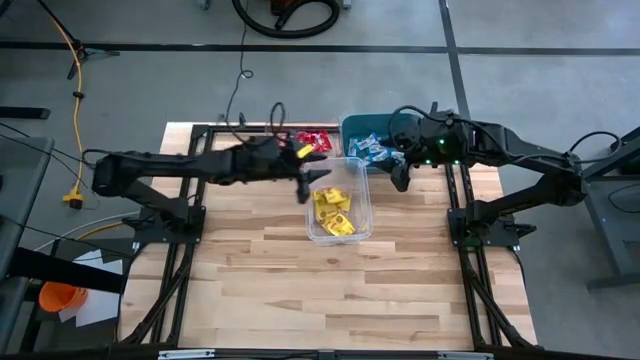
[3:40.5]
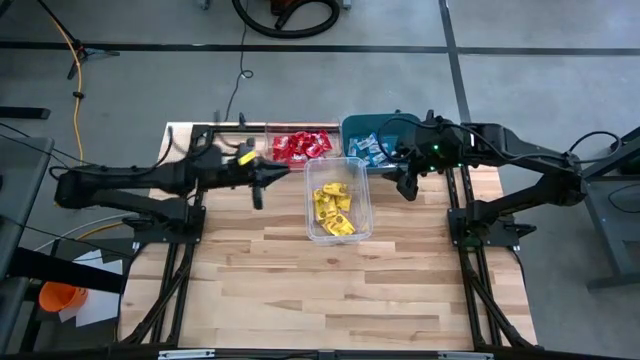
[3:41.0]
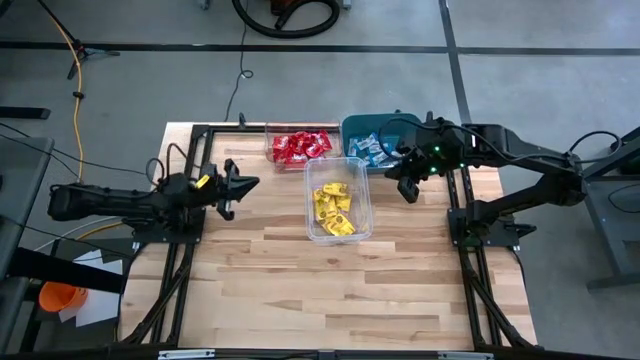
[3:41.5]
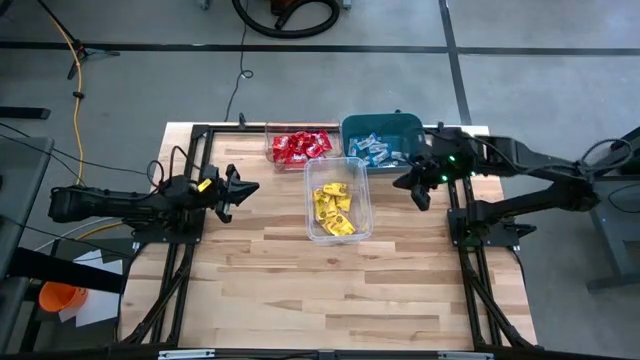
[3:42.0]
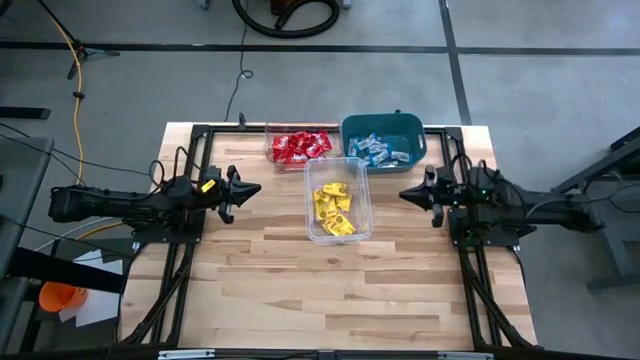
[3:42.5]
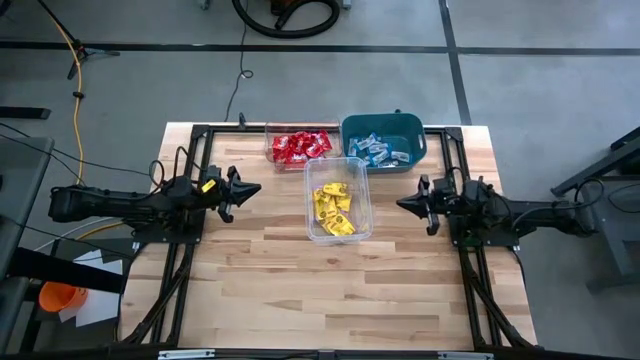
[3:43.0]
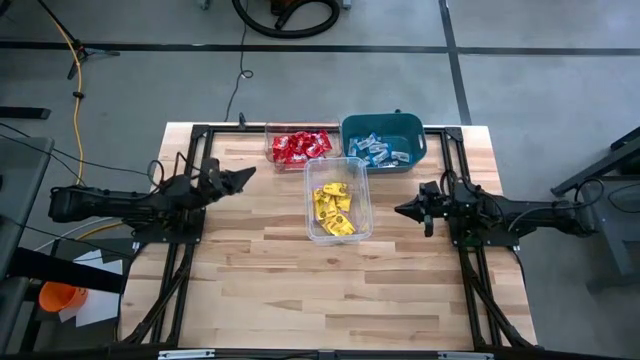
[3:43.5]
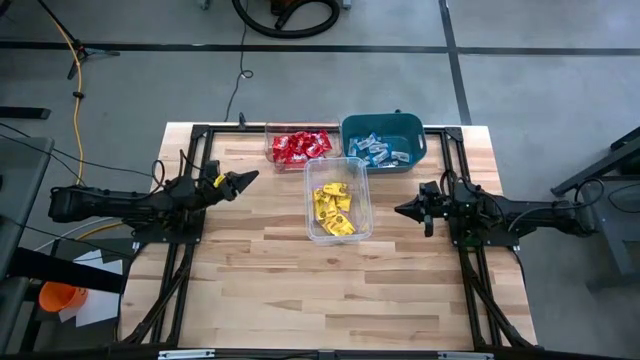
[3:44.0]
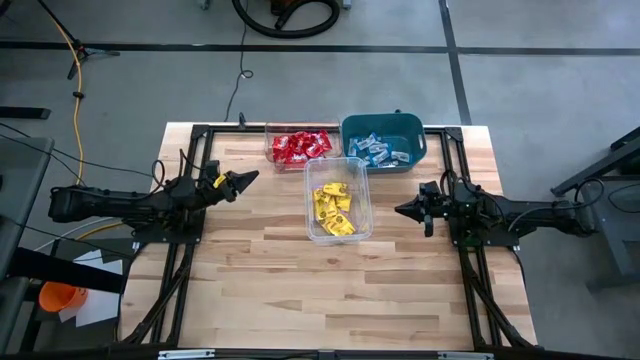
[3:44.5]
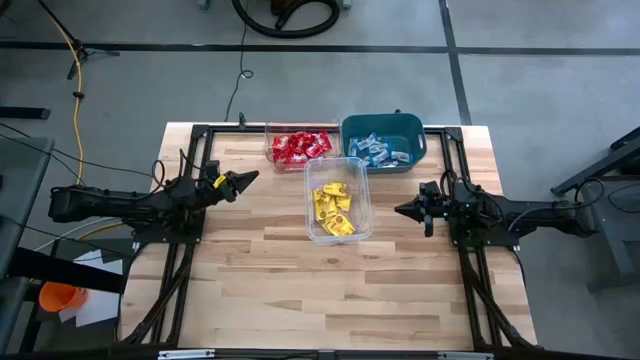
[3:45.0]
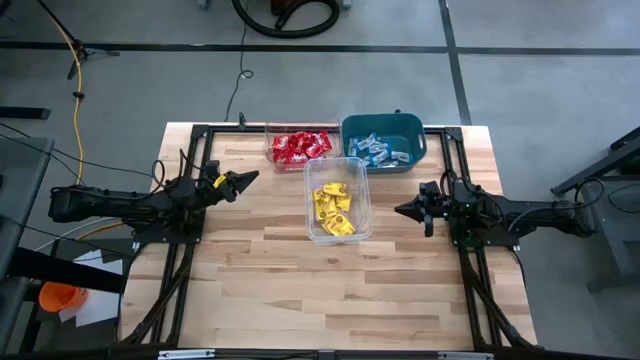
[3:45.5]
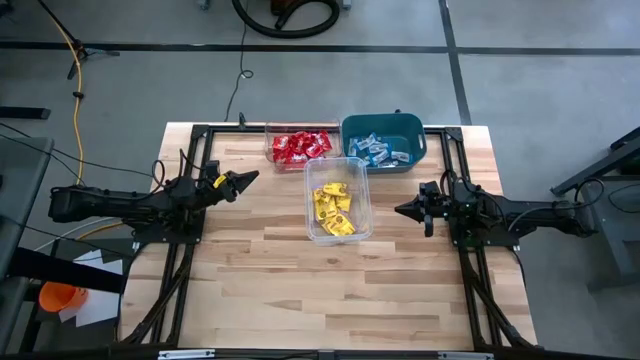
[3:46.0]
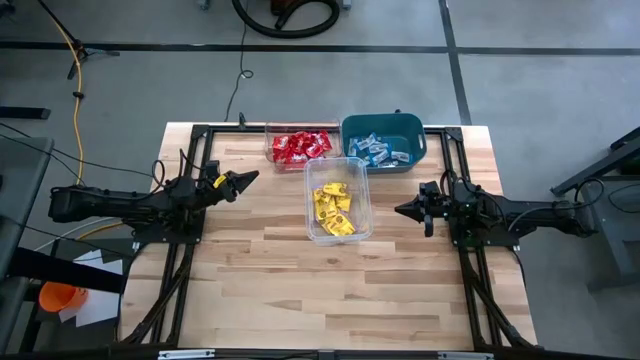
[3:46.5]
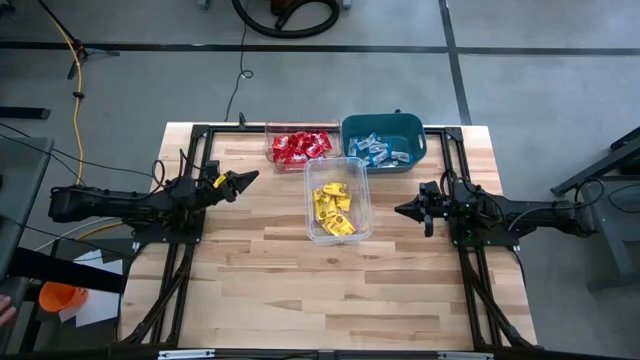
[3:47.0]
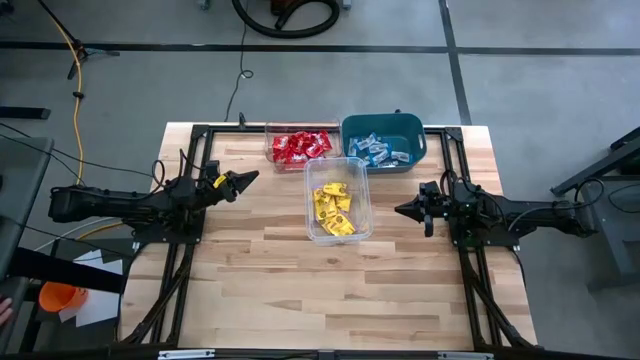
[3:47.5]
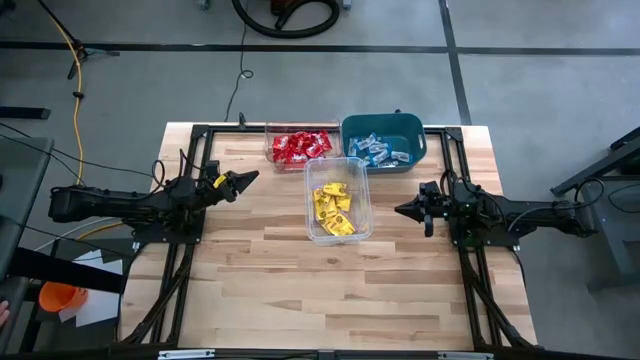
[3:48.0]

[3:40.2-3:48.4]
Task: Sort candy
Return to Home Position

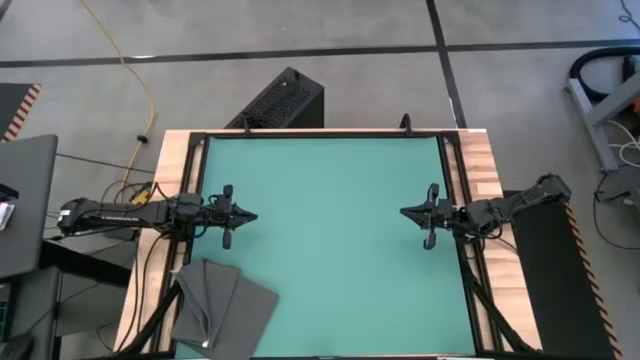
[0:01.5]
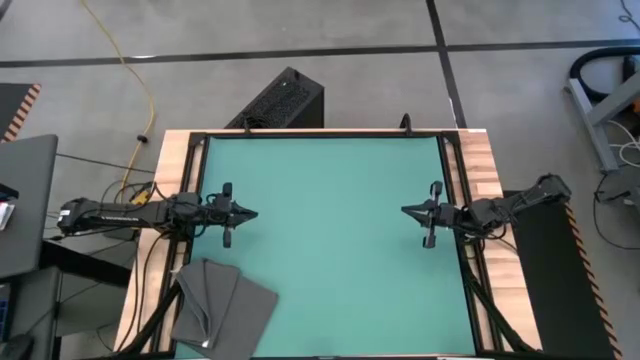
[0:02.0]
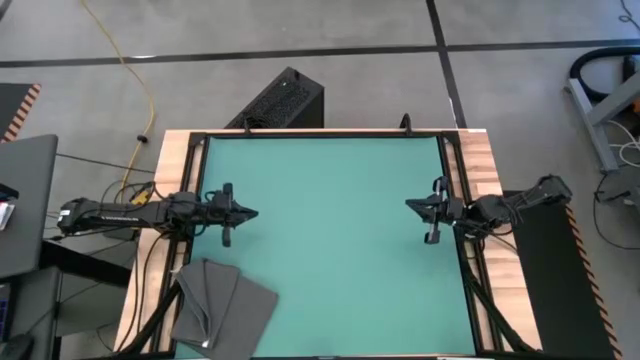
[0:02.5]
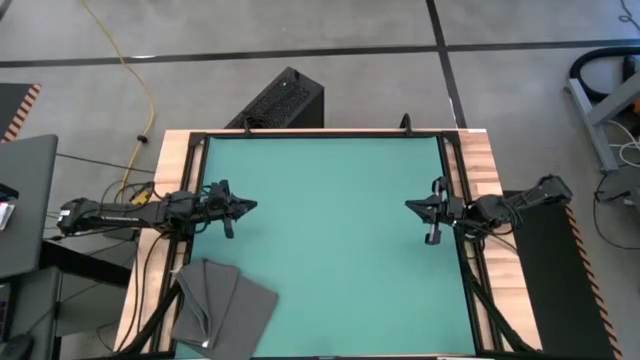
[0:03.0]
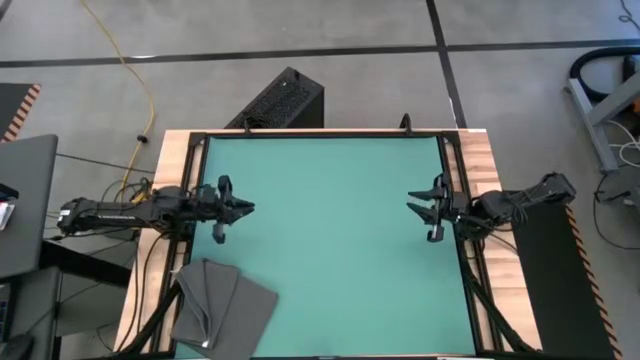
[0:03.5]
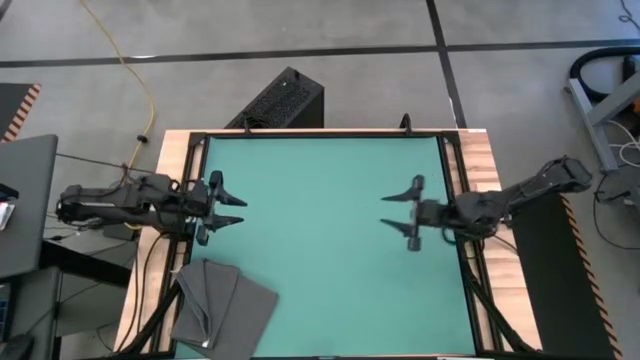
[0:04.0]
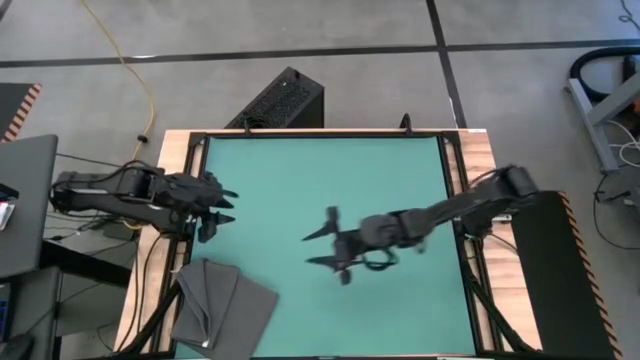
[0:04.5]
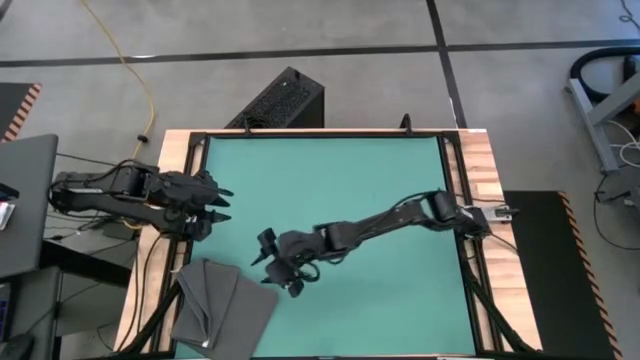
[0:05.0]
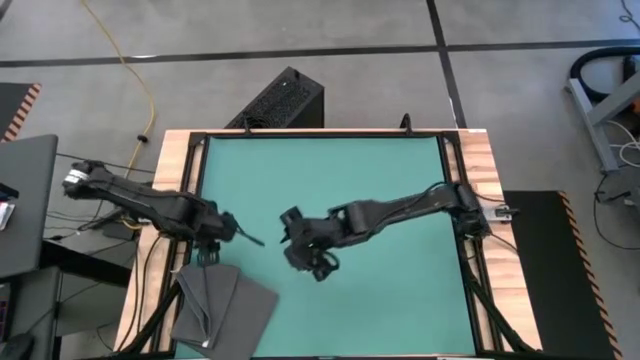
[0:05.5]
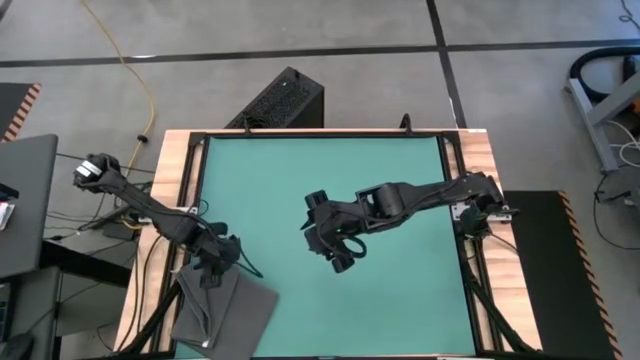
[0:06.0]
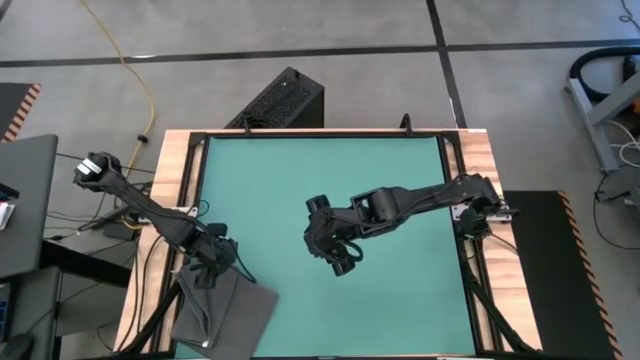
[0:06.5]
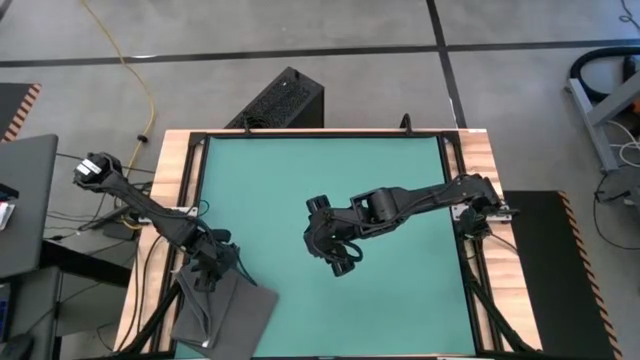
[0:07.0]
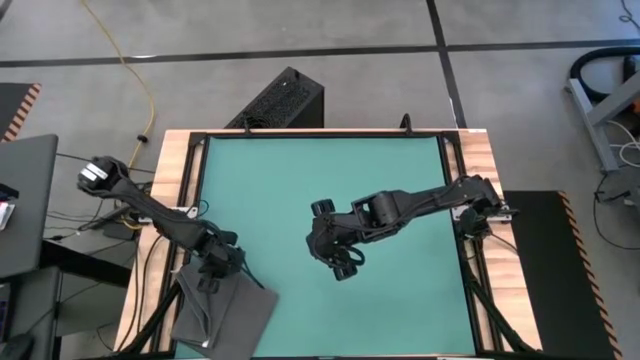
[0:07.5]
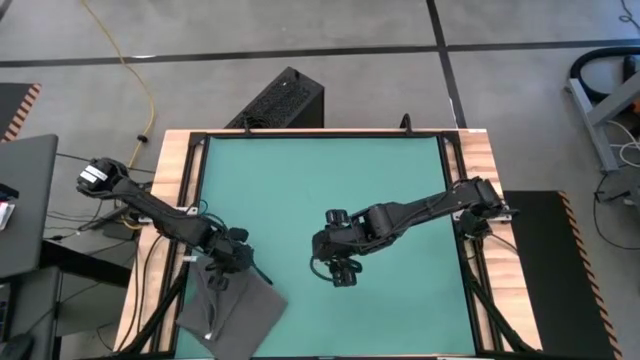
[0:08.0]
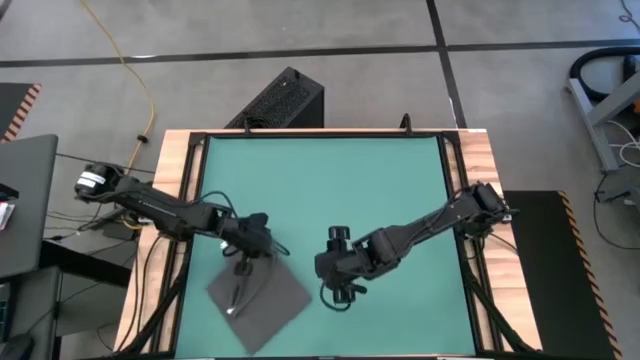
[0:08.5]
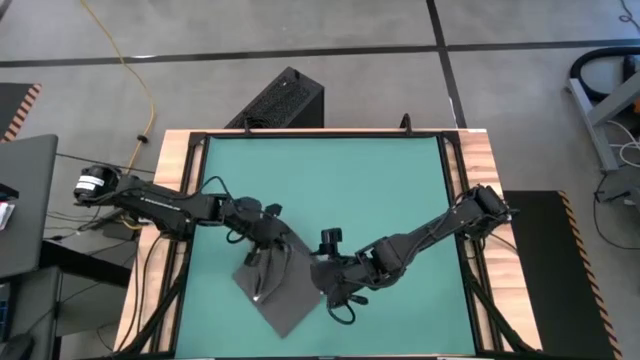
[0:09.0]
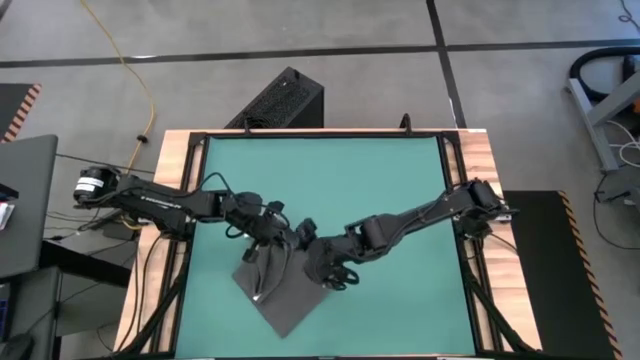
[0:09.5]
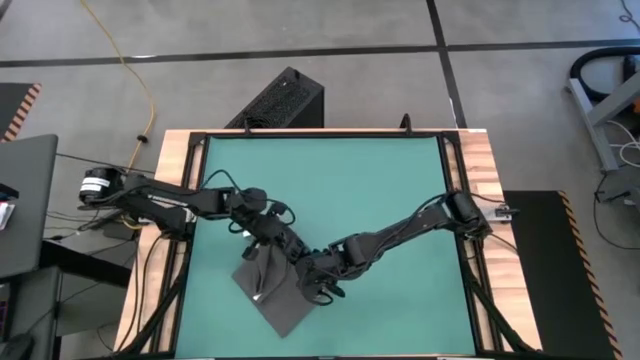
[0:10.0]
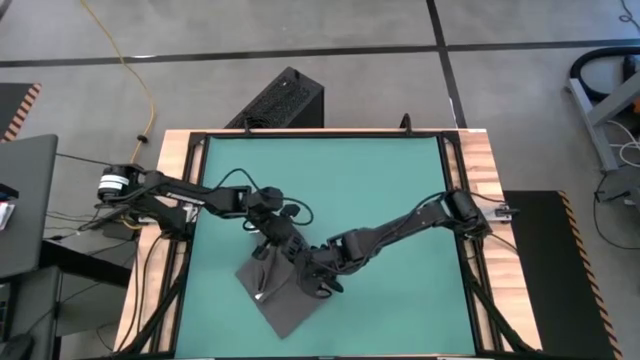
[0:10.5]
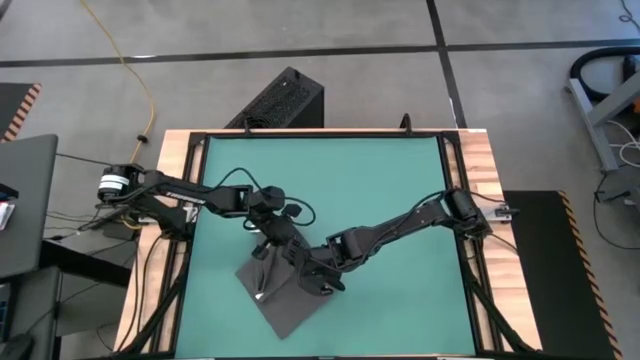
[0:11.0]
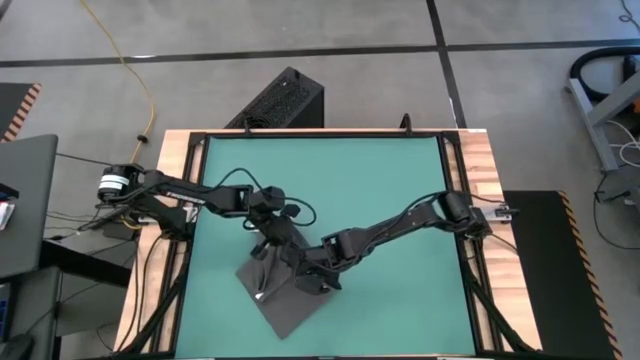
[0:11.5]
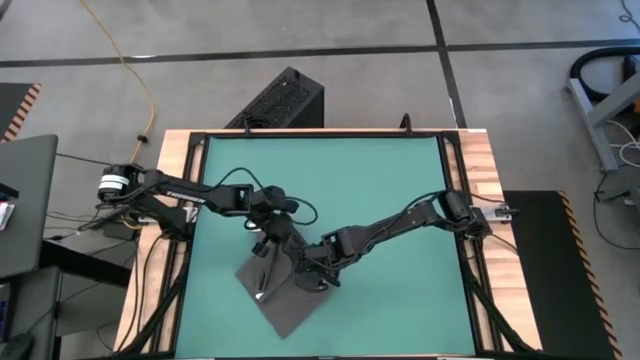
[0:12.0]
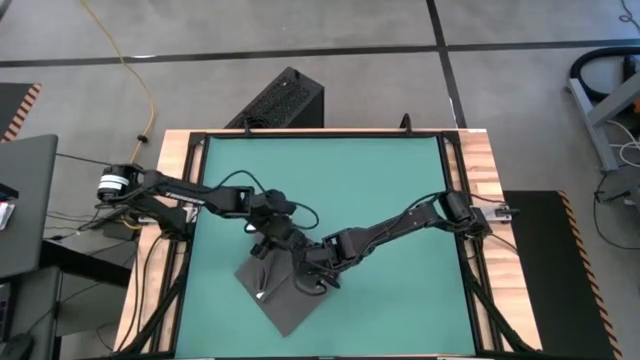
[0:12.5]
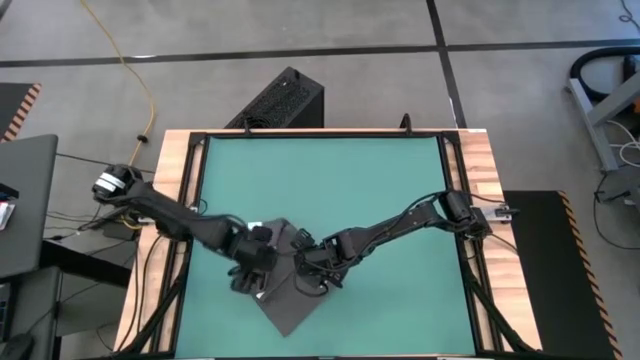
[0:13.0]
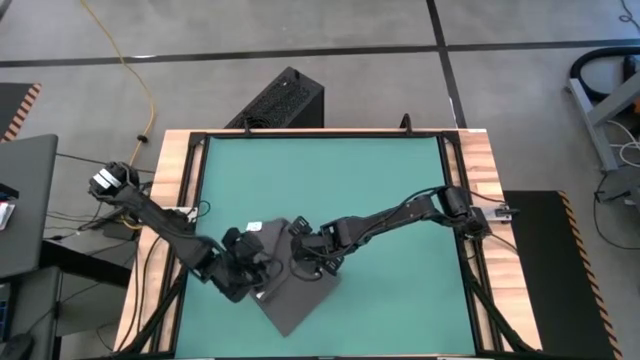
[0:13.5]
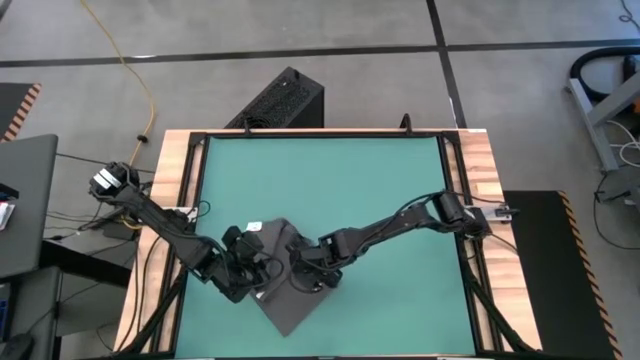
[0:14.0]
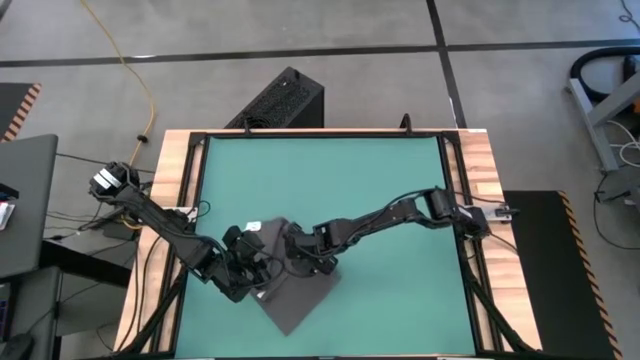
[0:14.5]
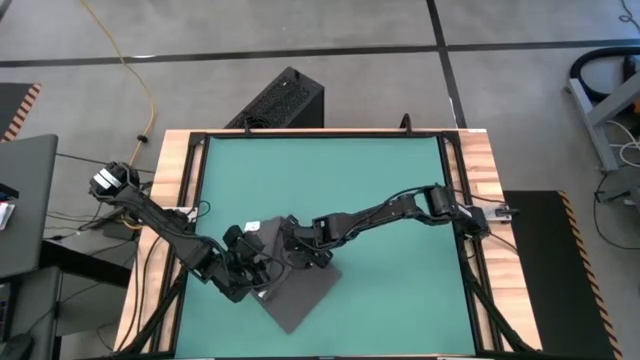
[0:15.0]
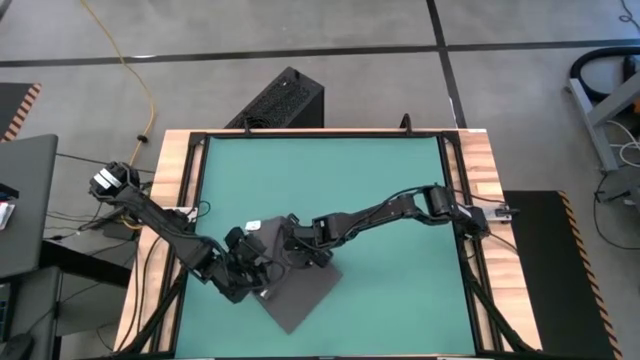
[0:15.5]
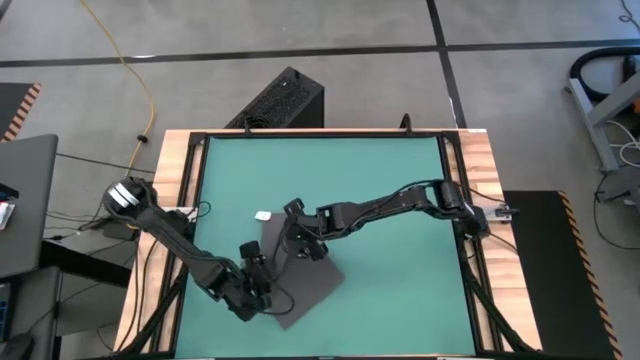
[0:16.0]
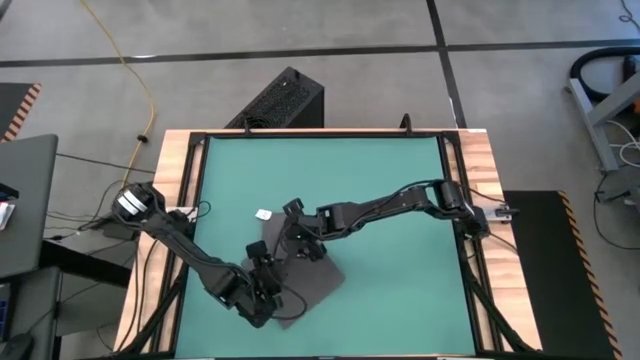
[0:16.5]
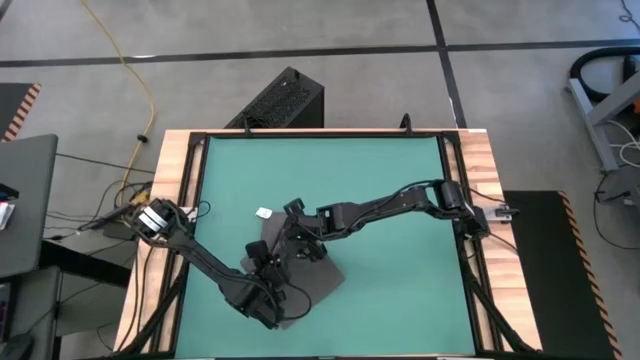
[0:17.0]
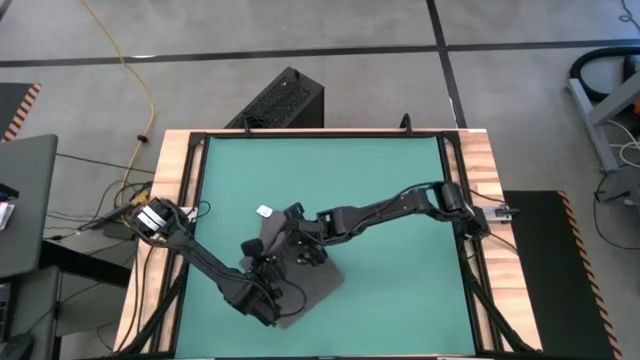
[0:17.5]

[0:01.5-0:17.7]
Task: Roll towel into tight, uniform cylinder
Roll the gray towel
